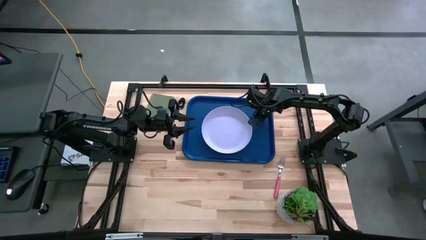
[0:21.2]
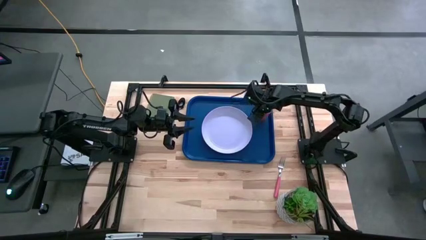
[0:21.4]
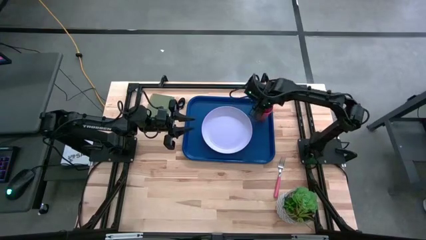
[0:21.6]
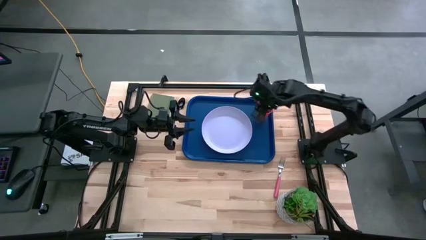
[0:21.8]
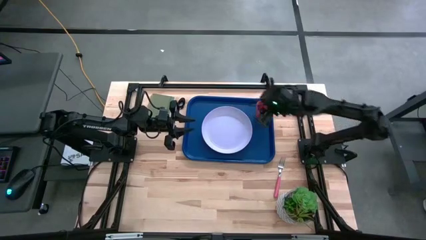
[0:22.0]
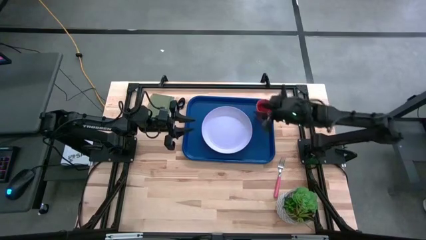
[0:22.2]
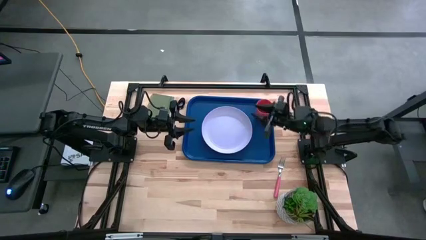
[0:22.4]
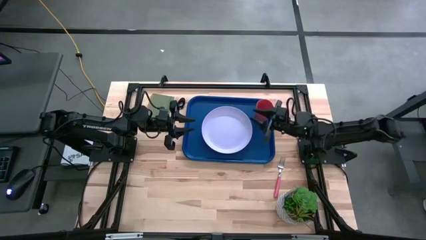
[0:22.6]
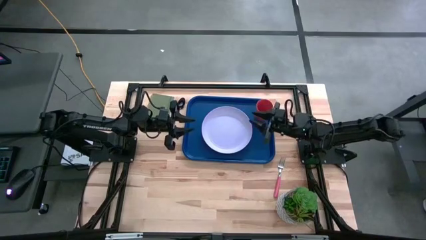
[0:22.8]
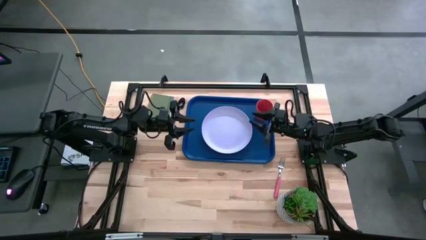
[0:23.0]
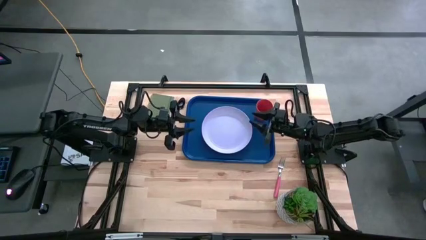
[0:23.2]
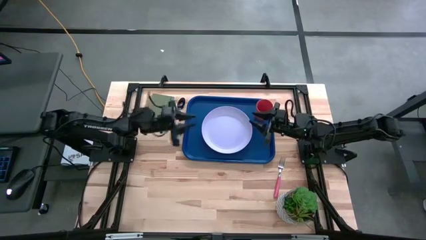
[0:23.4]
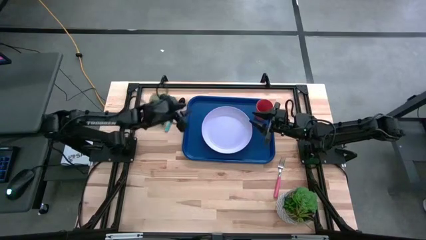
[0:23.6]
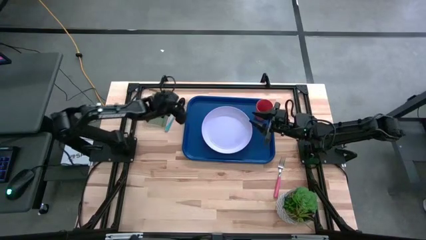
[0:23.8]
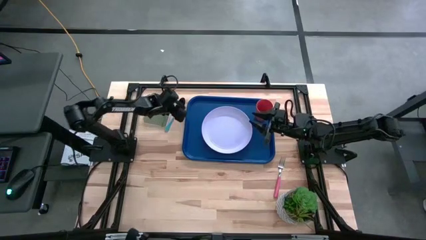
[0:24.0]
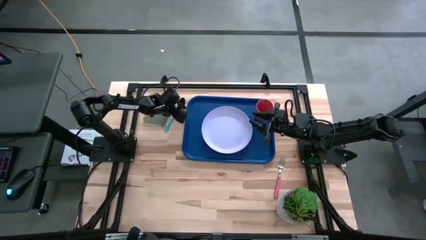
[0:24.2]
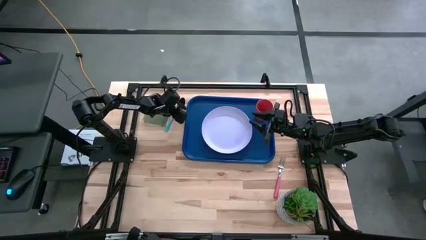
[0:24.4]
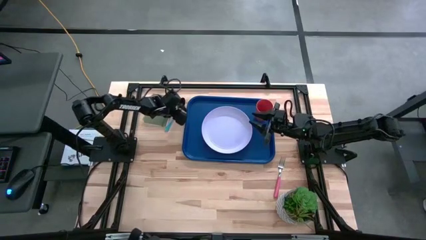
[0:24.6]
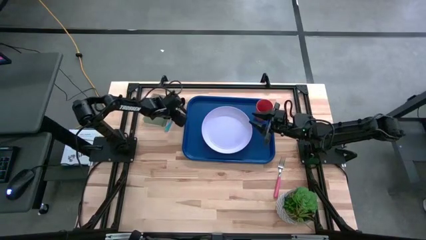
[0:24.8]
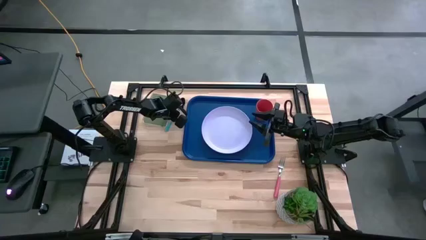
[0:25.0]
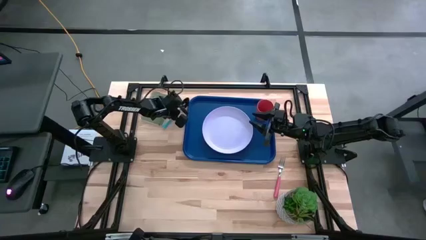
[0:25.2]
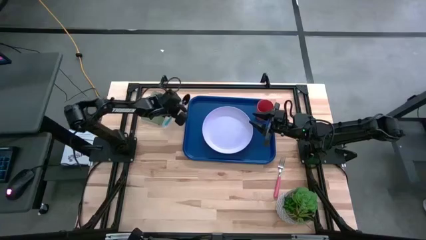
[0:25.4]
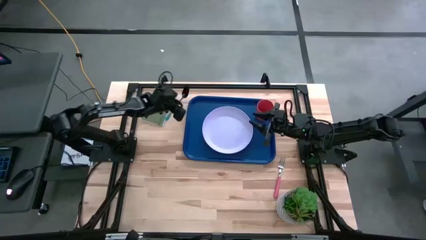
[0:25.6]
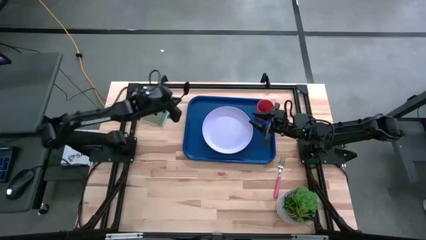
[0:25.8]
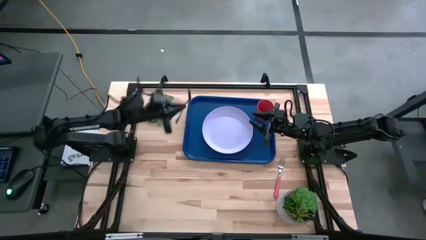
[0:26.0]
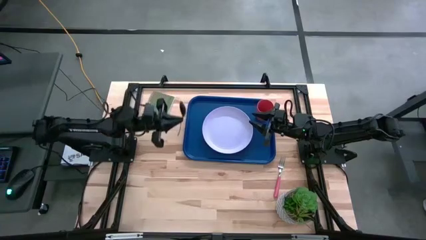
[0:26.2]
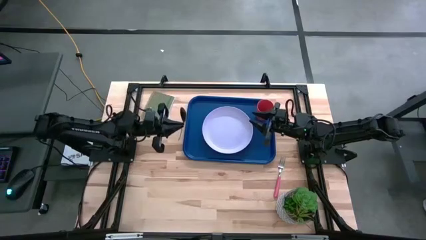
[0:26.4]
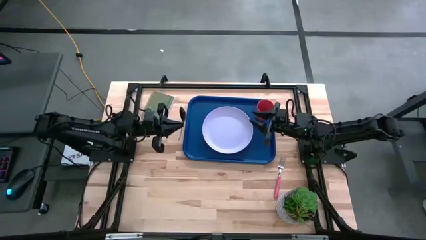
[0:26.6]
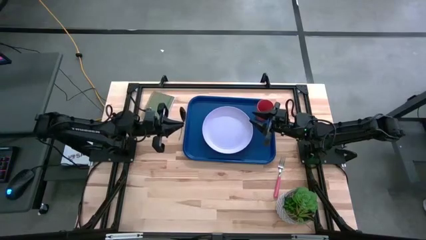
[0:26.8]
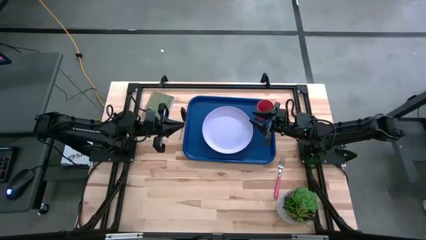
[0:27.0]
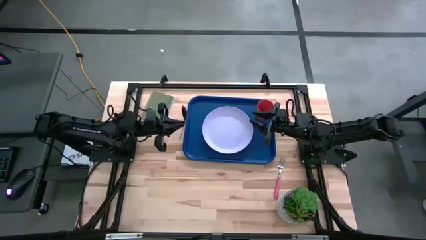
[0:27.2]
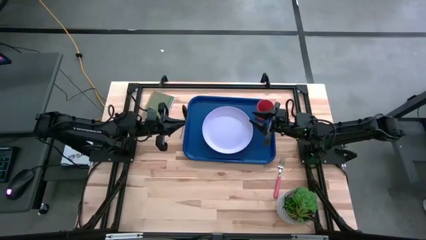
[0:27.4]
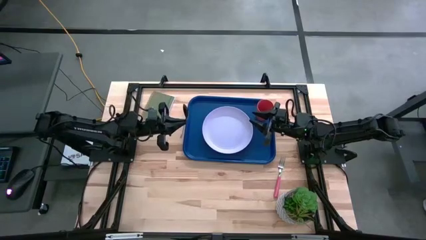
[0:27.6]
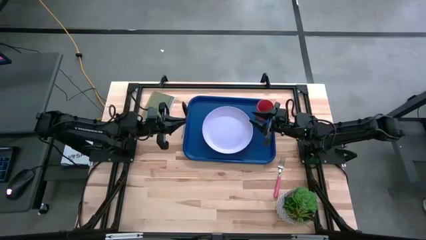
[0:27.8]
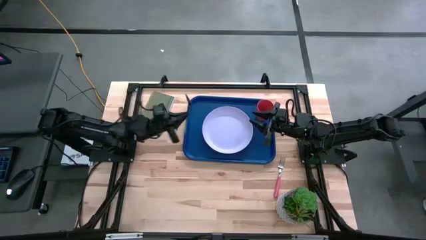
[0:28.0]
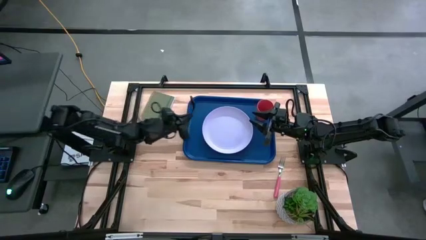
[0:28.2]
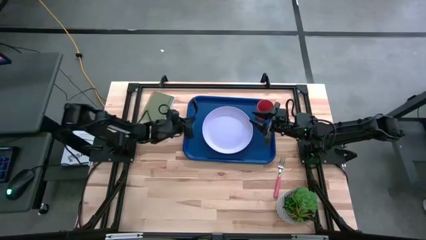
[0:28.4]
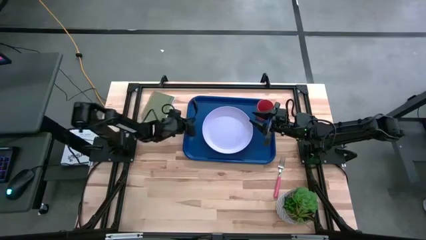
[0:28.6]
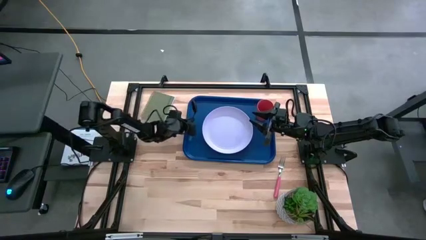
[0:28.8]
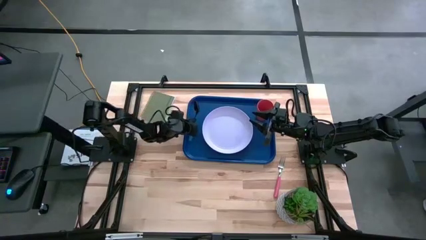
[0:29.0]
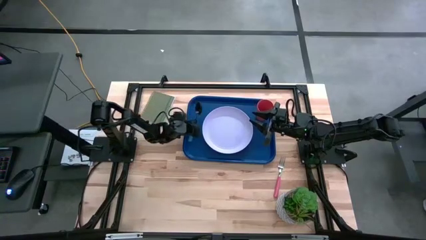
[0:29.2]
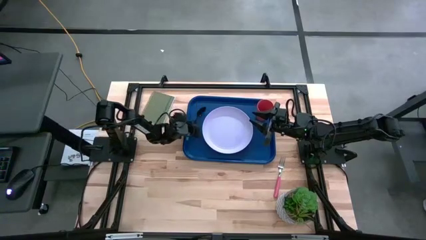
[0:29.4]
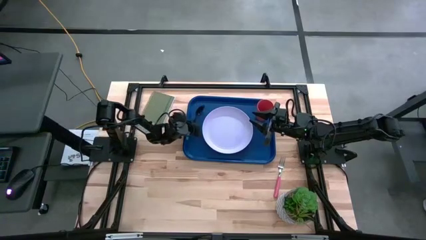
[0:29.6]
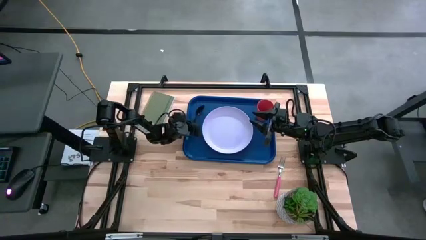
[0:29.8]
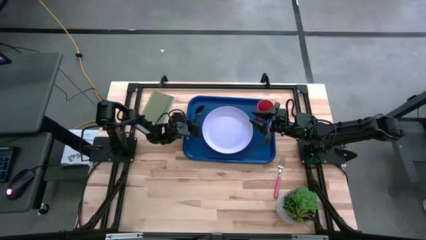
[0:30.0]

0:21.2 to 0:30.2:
Task: Pick and place plate/cup/fork/spoon on tray
Put the blue spoon on the blue serving tray to the left of the white plate

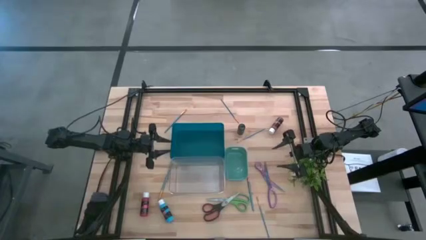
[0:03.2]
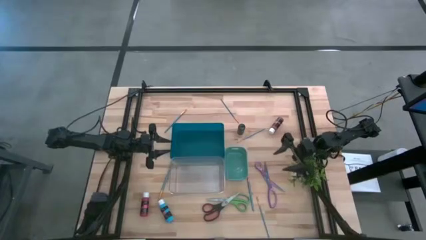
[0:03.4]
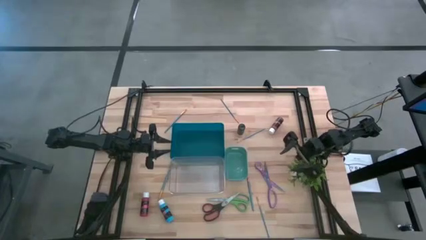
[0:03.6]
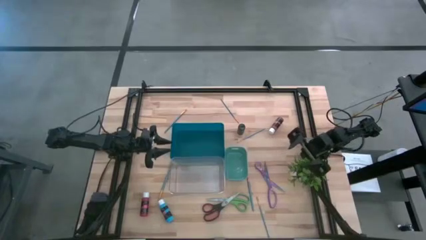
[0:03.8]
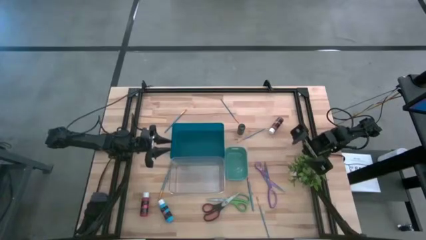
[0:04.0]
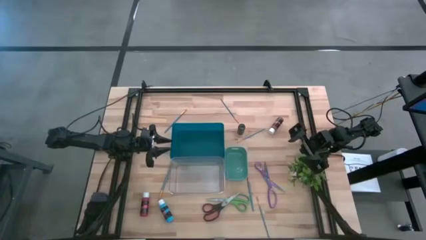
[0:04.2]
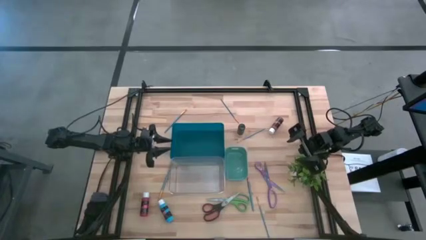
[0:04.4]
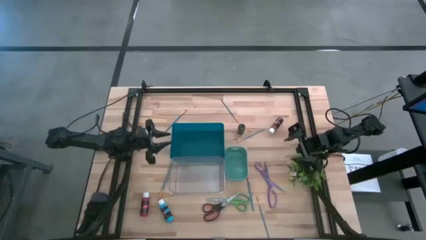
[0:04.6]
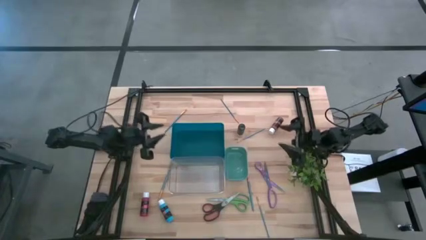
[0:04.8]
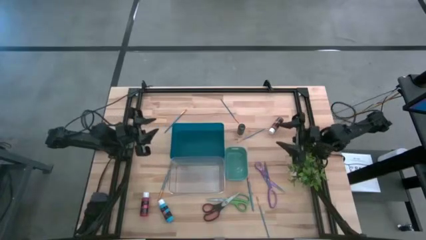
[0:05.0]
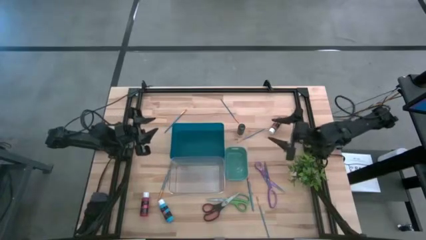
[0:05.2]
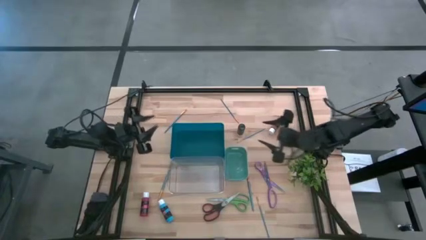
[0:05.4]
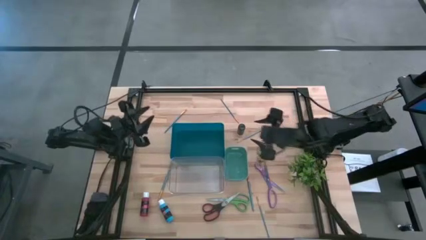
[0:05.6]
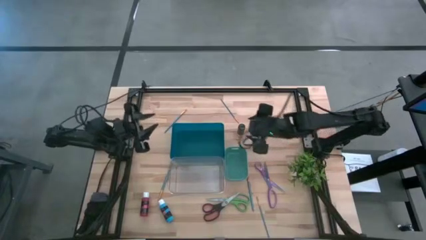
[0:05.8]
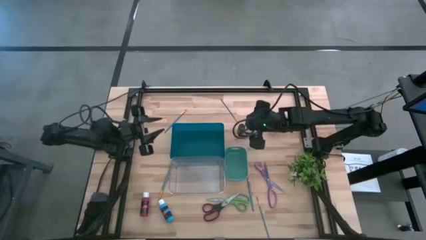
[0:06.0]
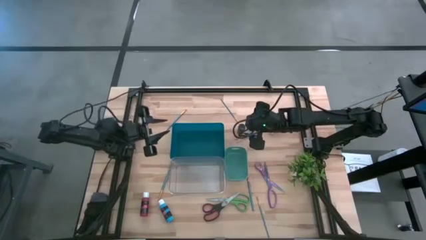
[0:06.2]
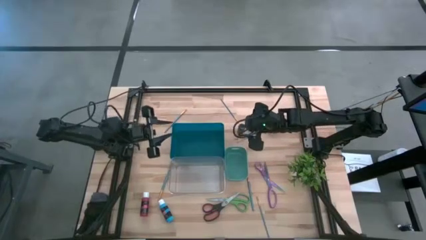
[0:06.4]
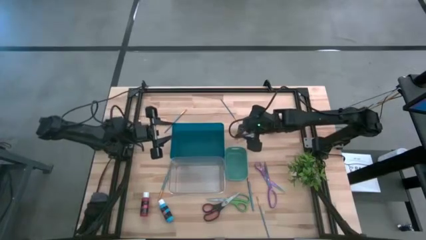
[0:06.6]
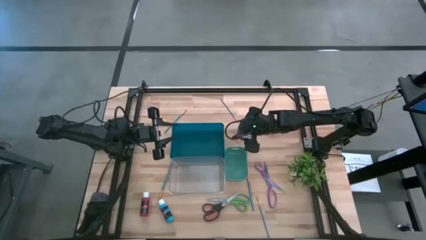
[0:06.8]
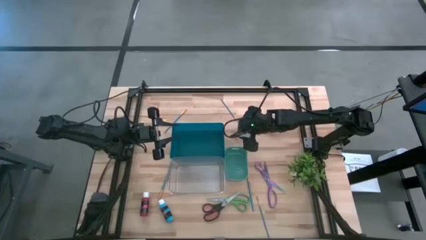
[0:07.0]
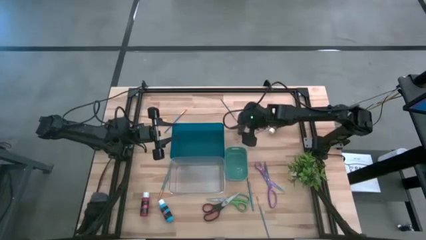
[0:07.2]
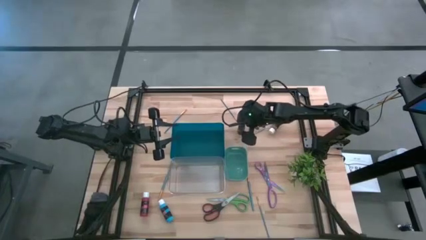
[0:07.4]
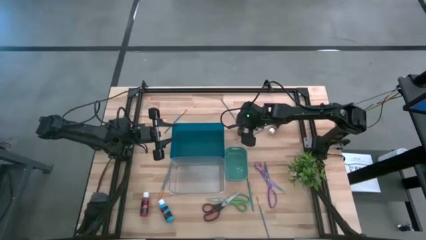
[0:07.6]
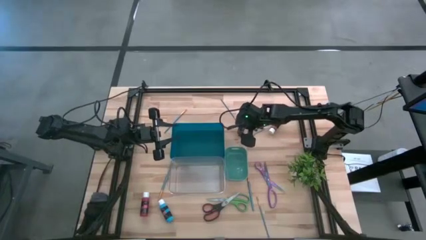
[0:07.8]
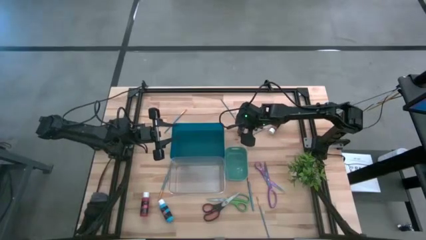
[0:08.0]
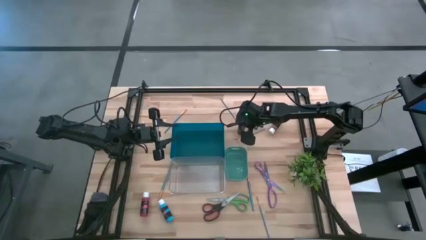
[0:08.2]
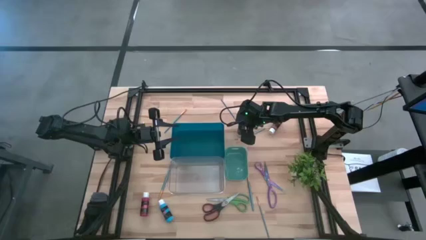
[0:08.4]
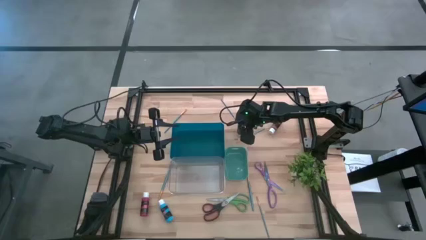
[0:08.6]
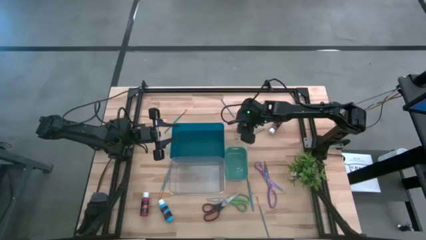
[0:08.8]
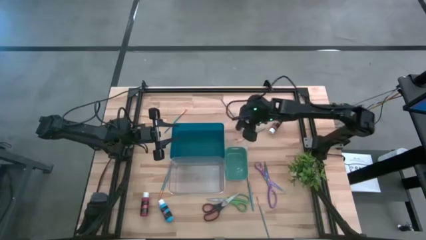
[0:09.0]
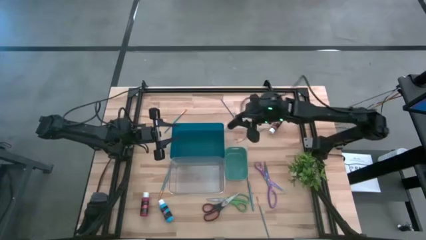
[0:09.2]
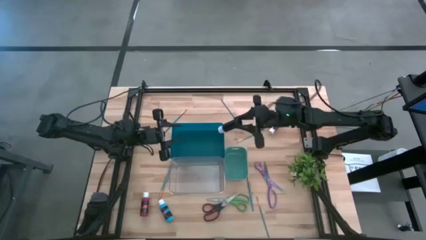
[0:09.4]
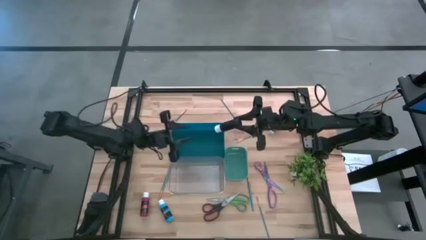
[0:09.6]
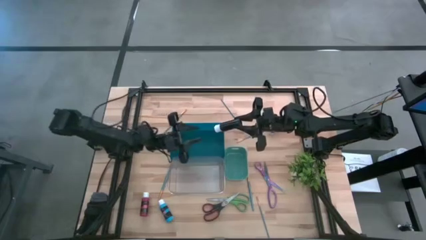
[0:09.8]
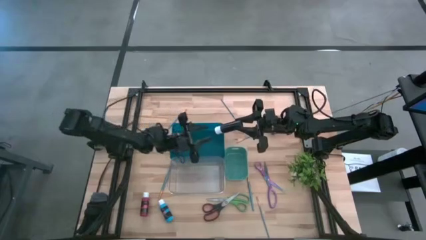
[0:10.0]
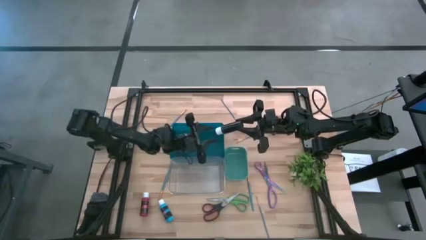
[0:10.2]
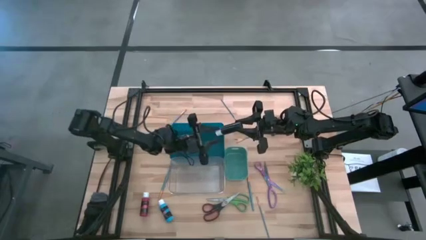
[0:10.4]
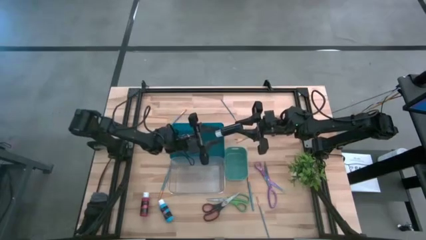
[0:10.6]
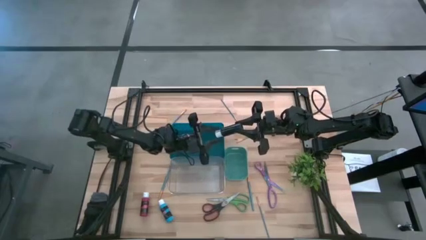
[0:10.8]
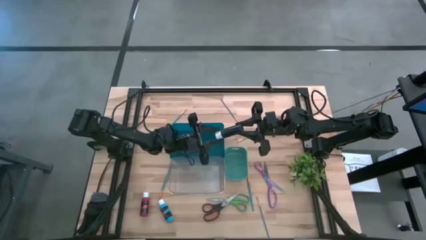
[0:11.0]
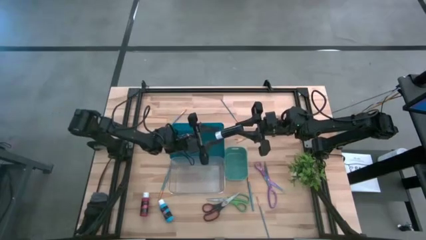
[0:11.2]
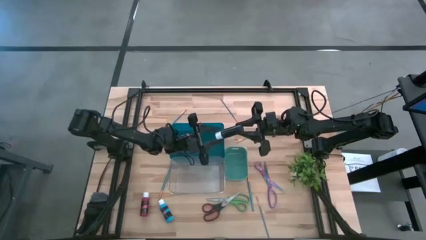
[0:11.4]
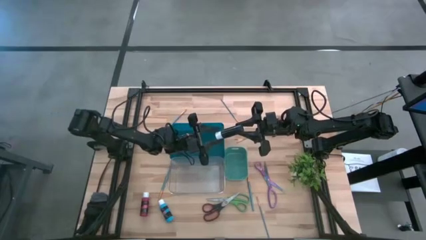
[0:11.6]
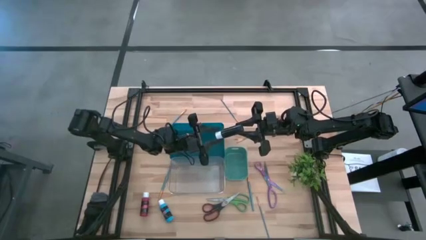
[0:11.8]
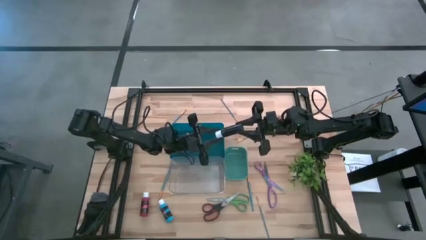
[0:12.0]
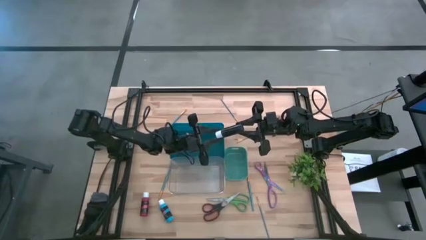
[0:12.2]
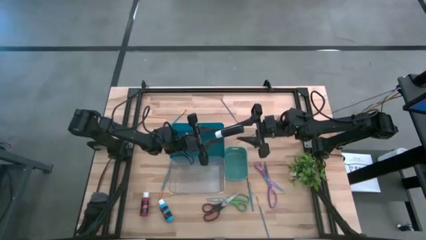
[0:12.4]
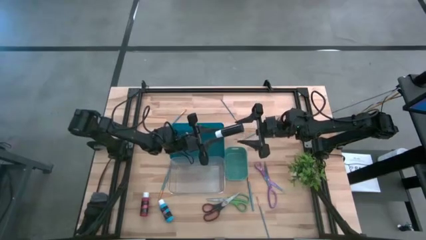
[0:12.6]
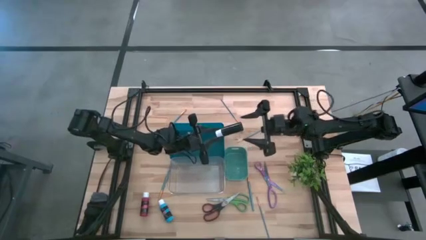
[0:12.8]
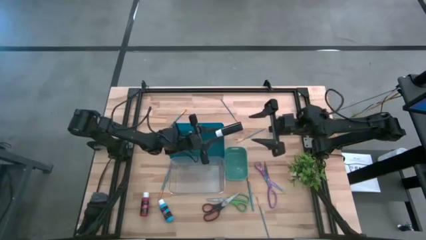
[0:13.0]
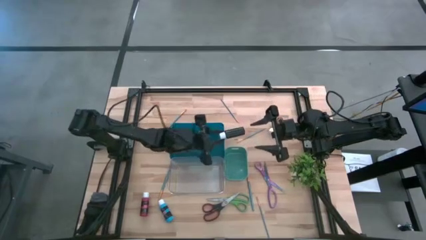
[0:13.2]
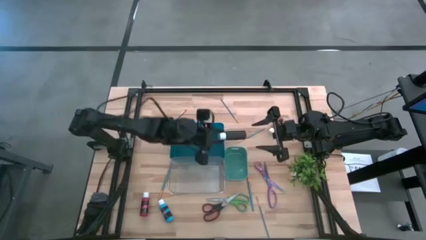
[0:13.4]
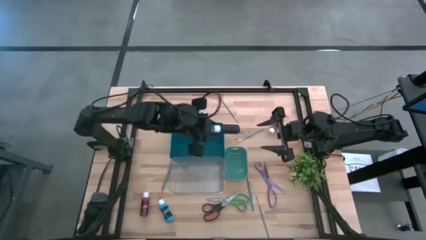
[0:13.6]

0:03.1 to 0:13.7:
Task: Pick & Place Paint Supplies
Put the black paint bottle into the green bin
